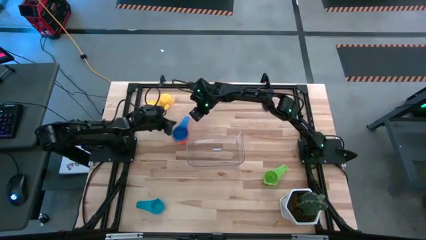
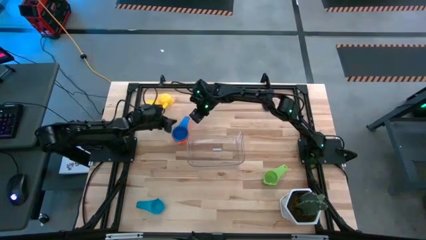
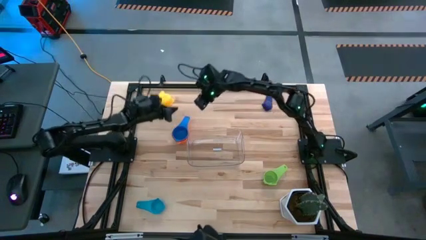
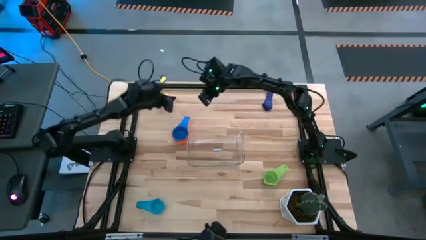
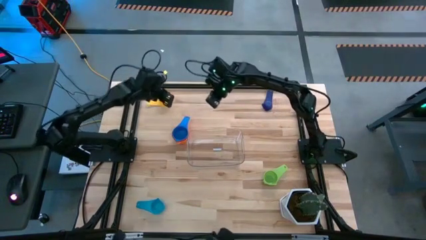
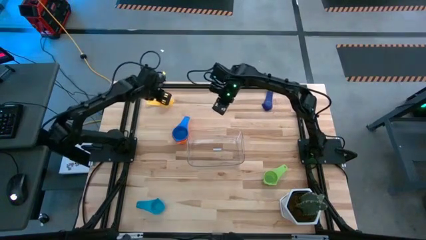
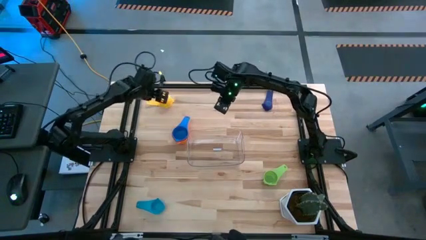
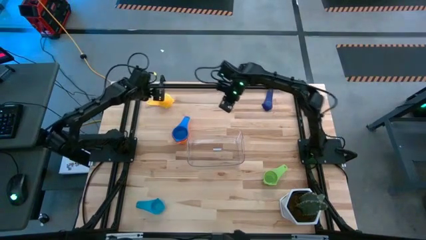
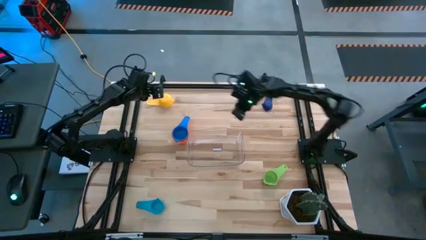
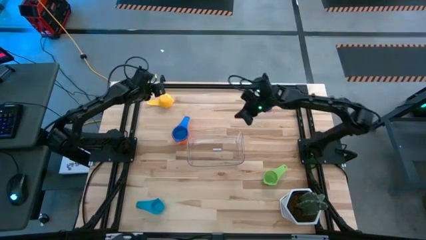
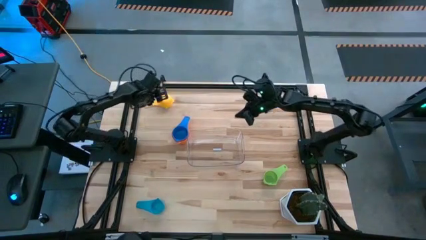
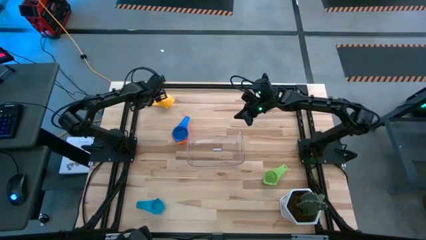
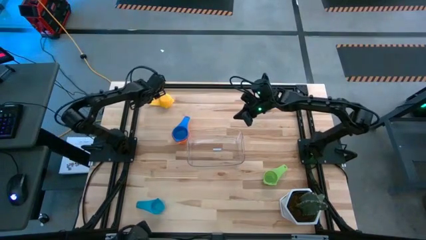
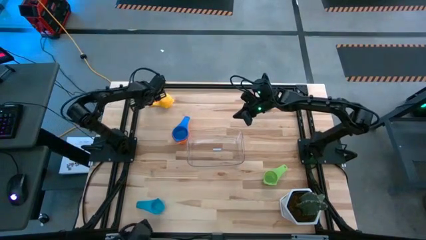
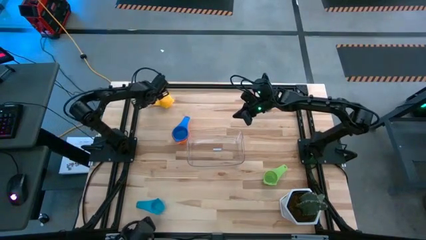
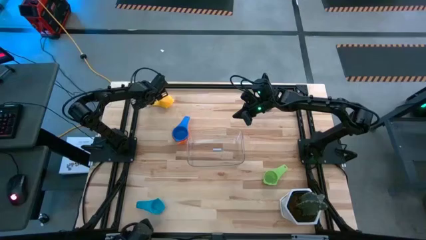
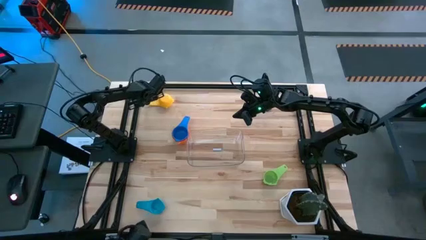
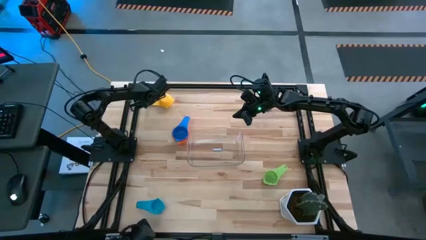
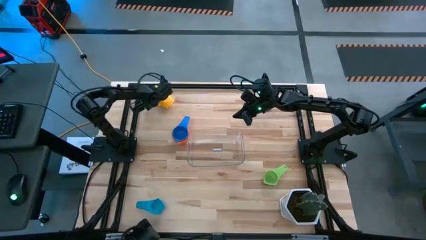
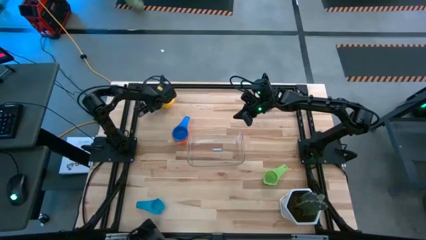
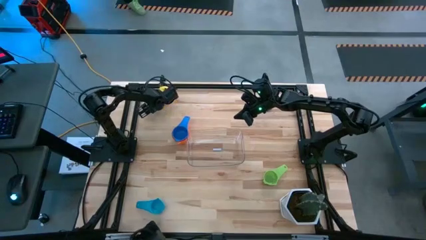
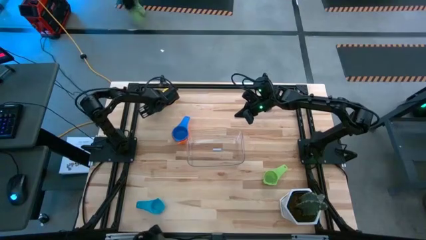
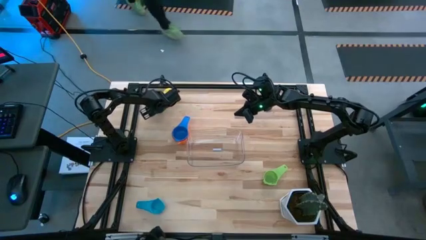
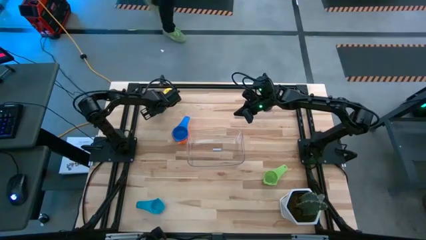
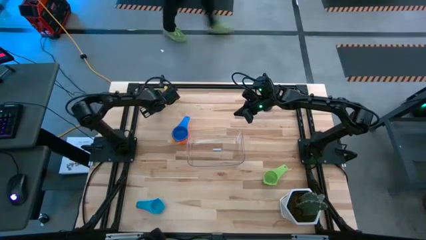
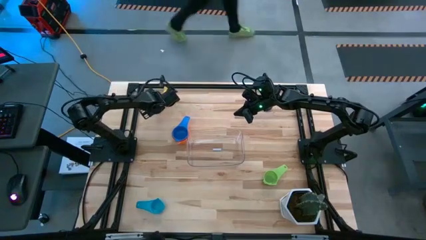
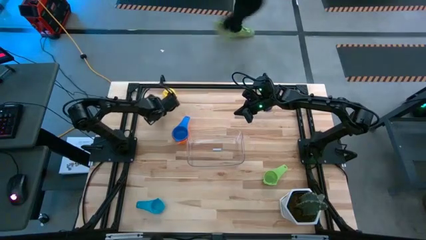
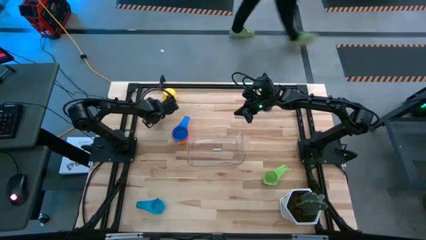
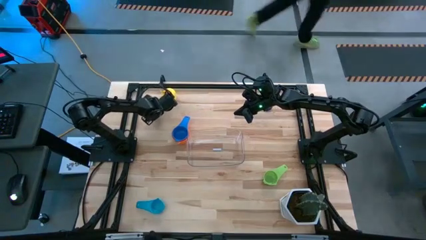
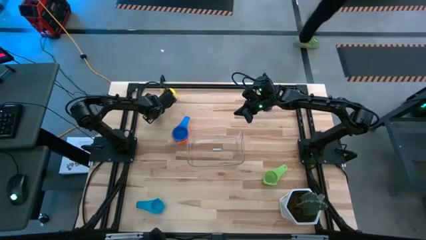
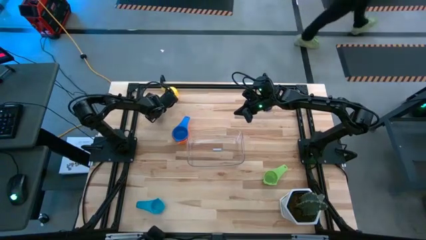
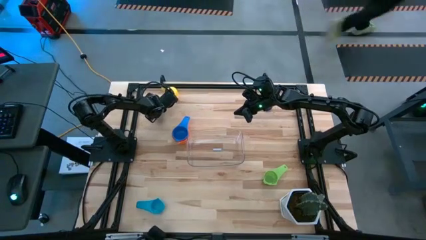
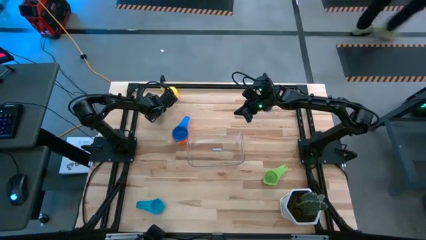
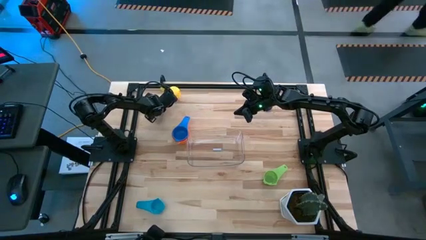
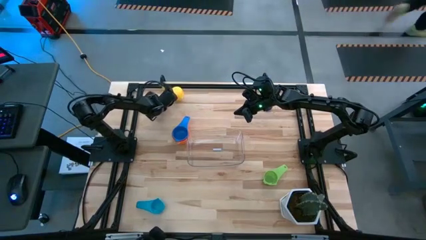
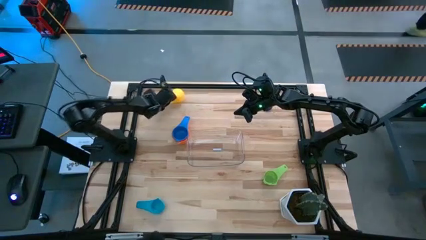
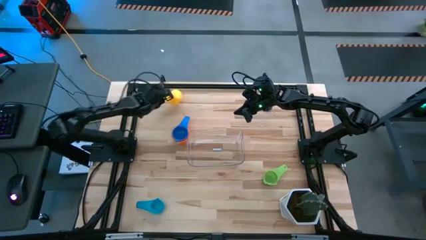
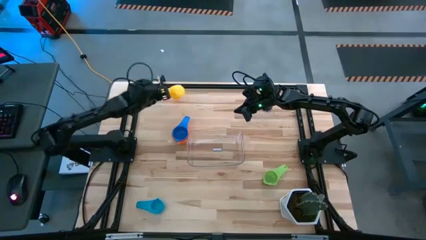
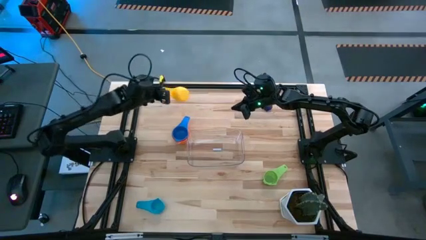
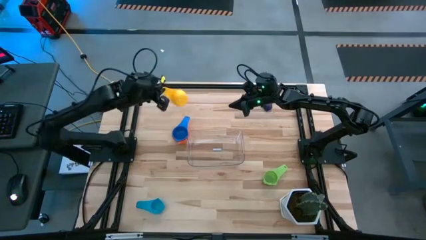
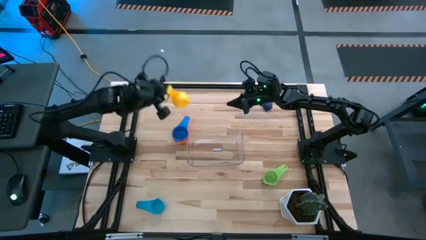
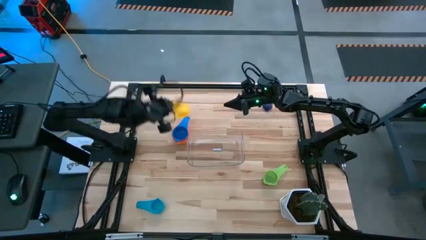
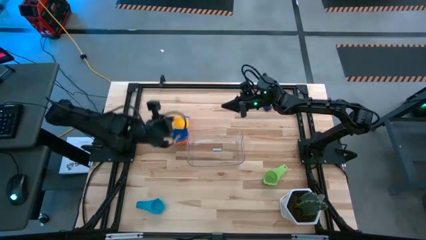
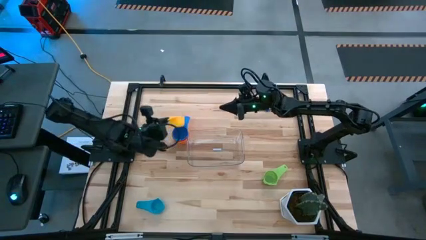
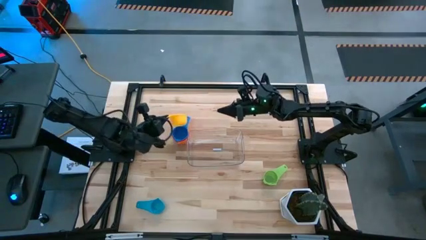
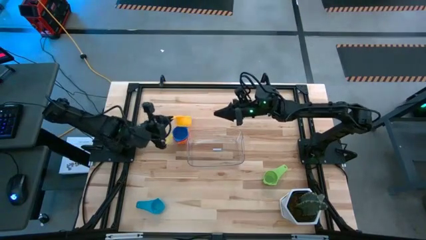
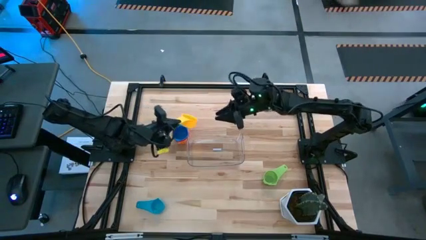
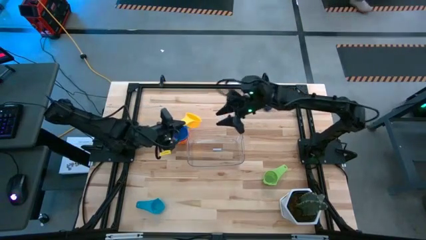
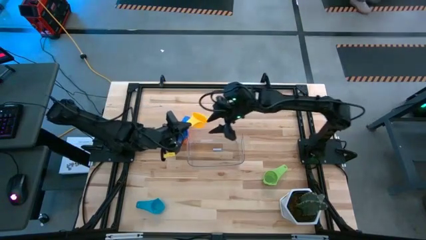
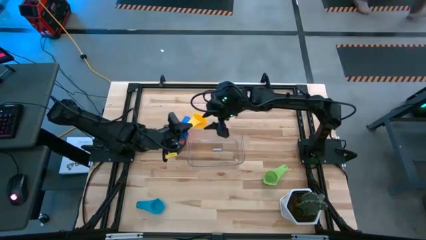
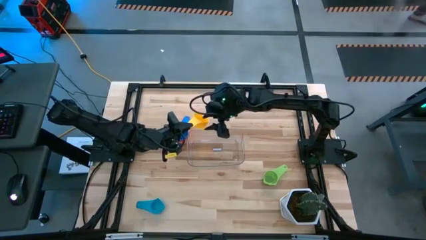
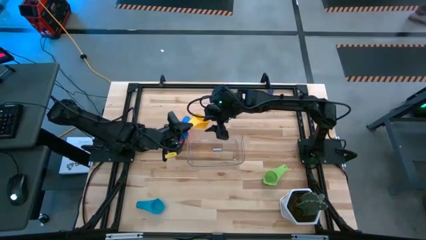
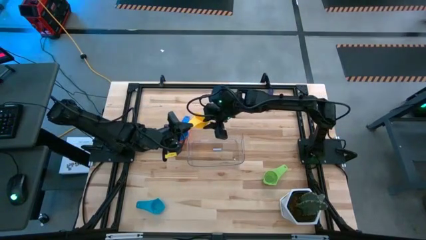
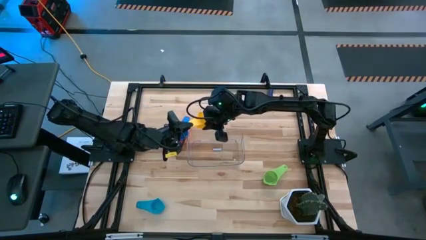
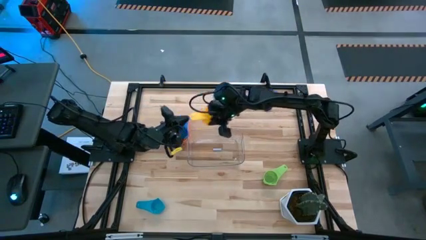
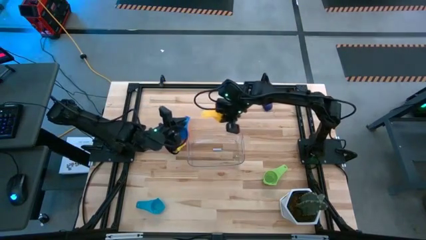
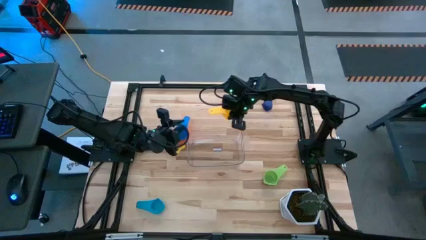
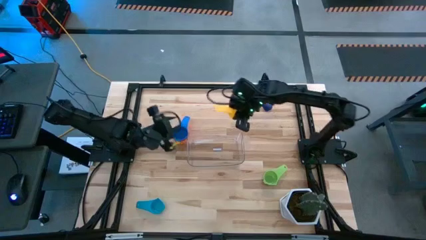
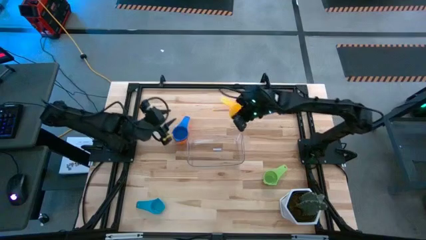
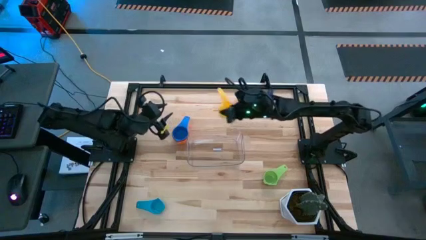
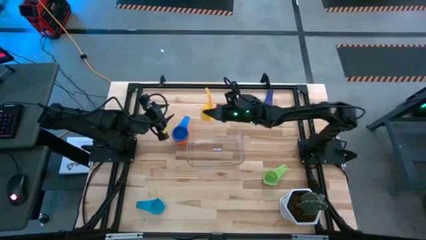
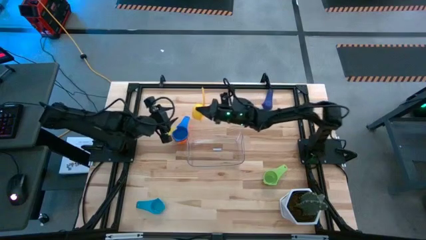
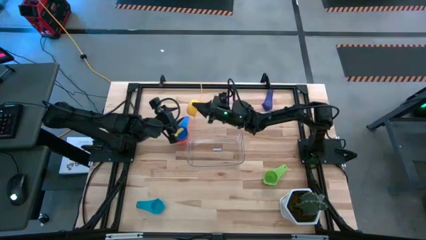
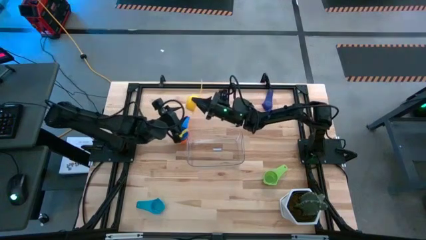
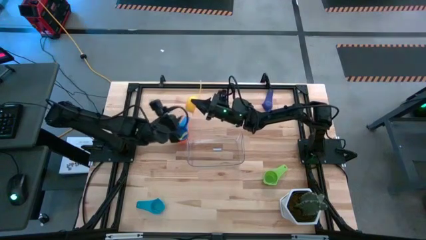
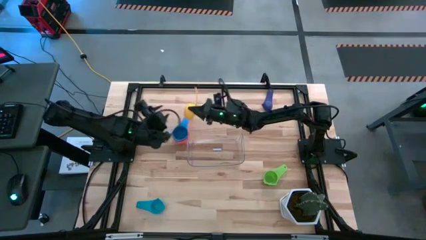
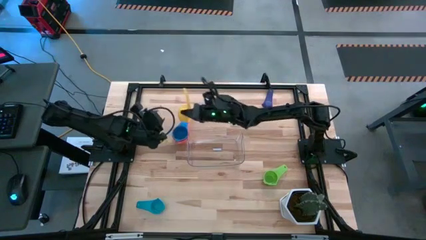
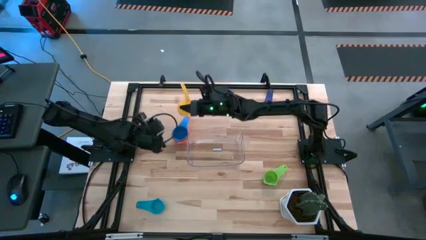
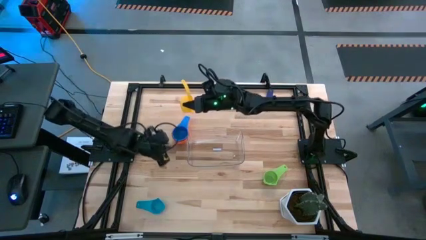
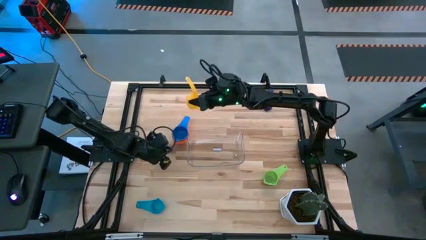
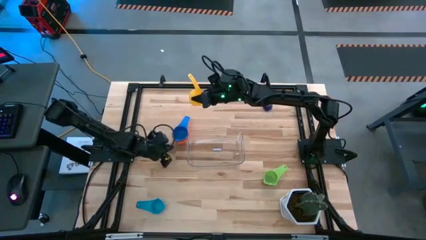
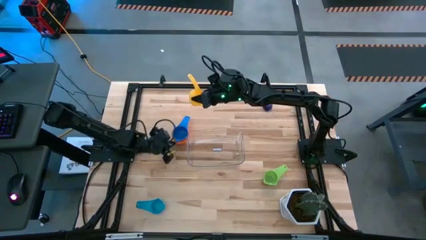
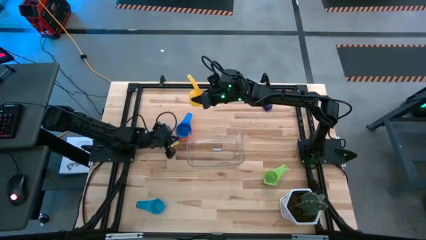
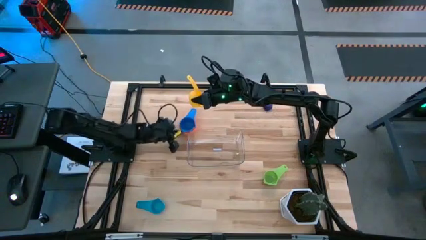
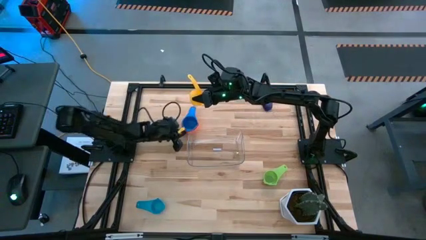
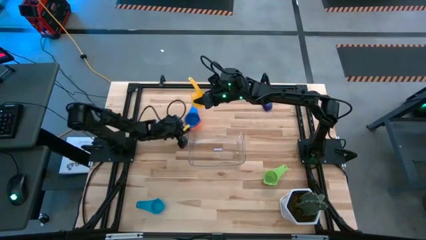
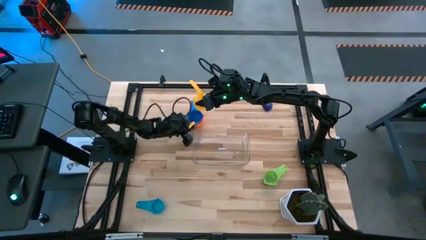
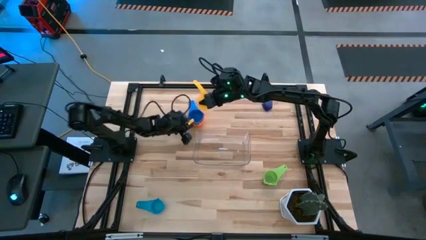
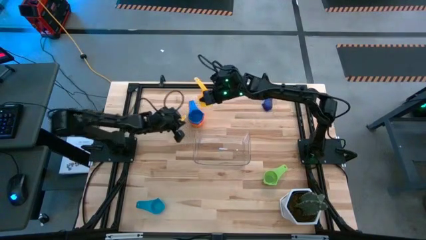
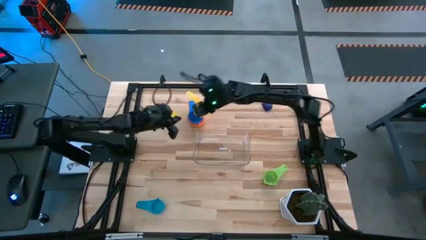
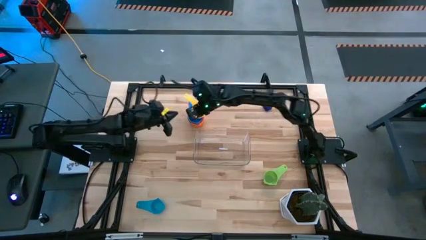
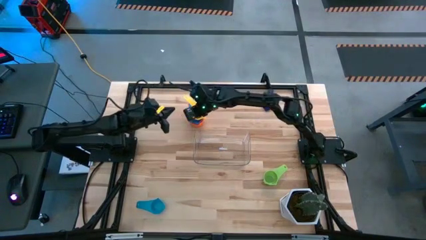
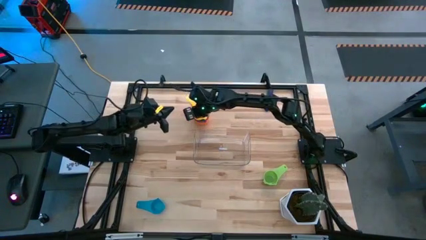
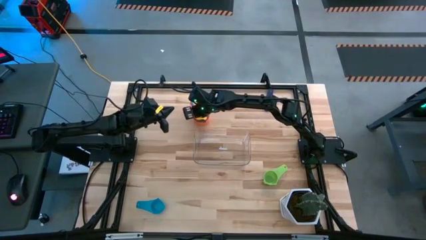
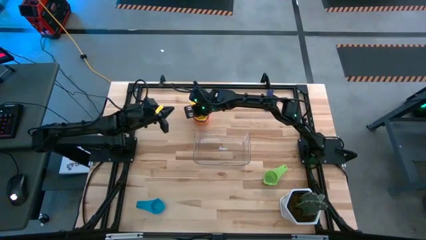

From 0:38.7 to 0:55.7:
Task: Nest measuring cups in basket
Stack the yellow measuring cup on top of the blue measuring cup
